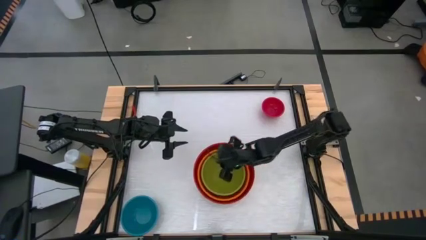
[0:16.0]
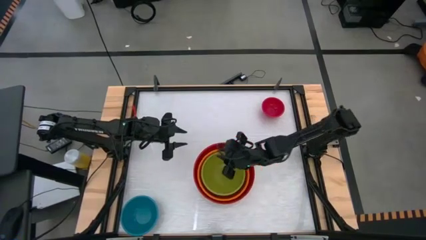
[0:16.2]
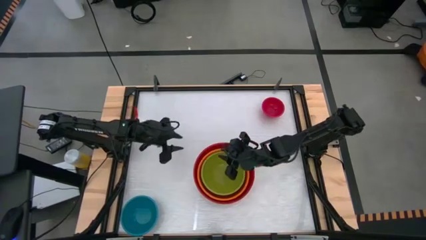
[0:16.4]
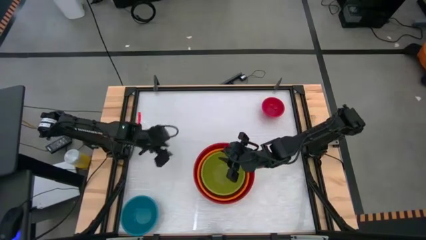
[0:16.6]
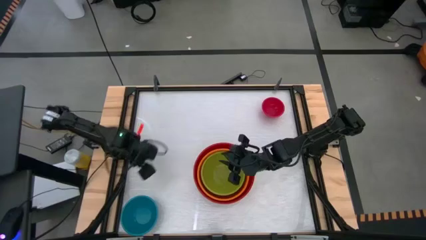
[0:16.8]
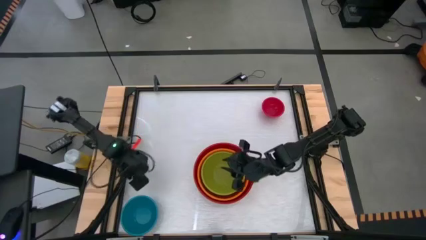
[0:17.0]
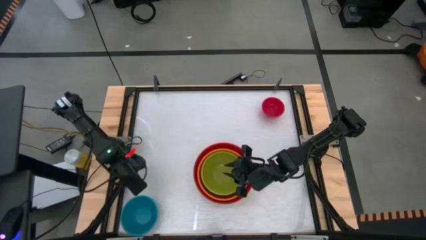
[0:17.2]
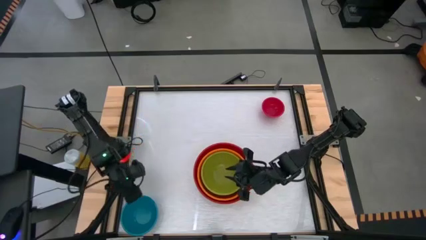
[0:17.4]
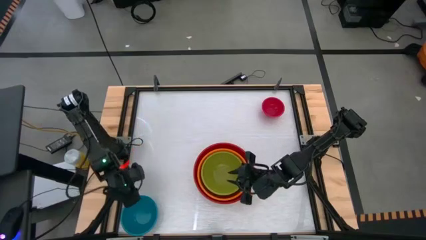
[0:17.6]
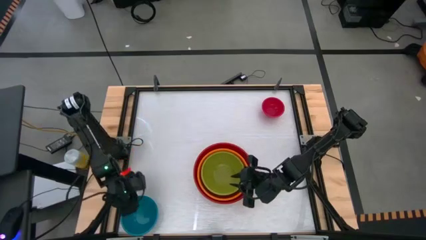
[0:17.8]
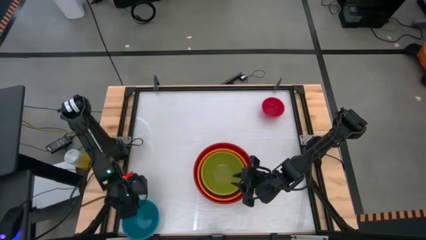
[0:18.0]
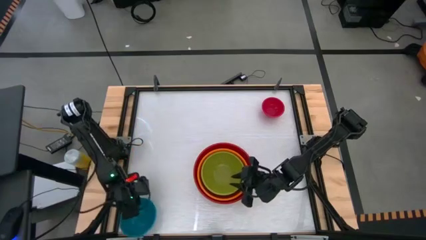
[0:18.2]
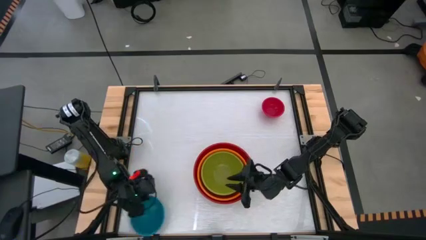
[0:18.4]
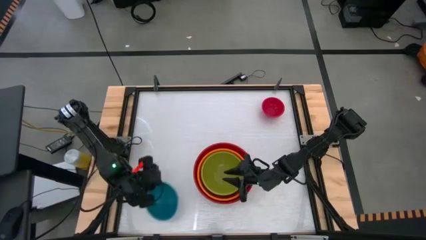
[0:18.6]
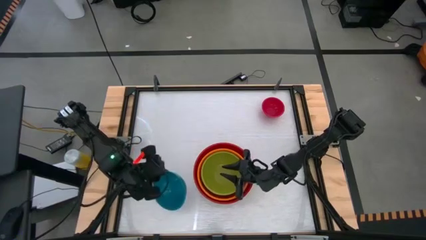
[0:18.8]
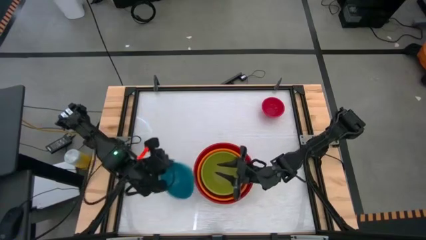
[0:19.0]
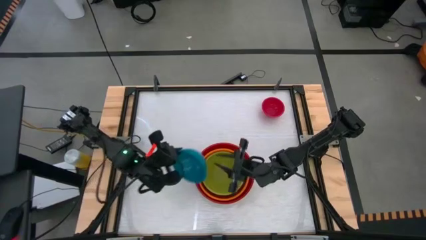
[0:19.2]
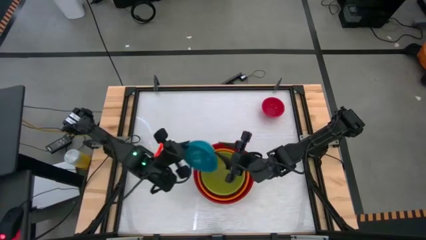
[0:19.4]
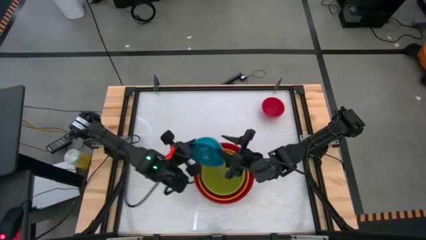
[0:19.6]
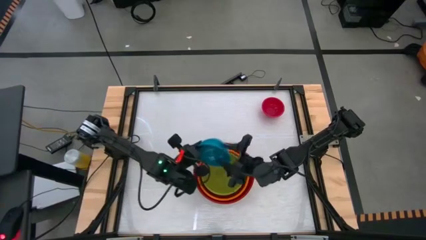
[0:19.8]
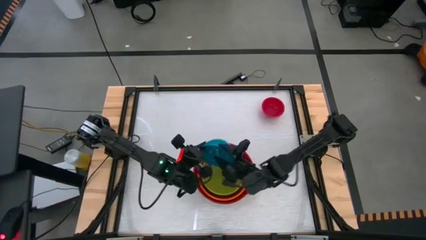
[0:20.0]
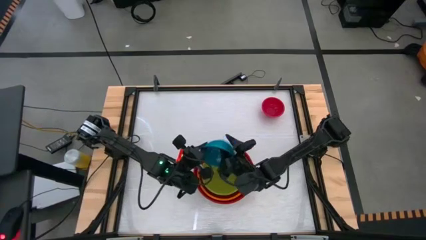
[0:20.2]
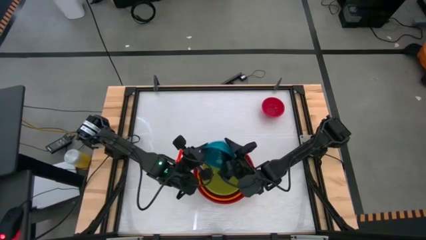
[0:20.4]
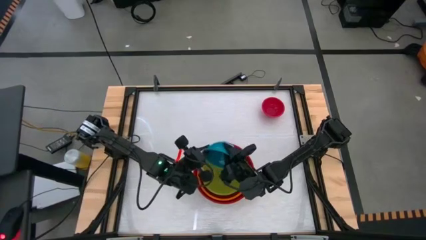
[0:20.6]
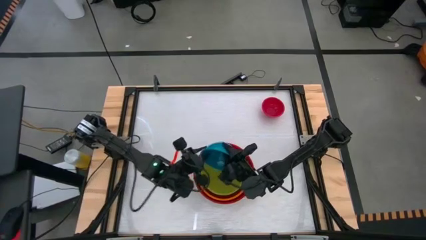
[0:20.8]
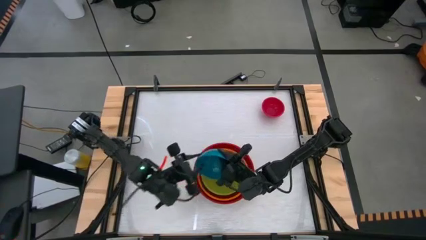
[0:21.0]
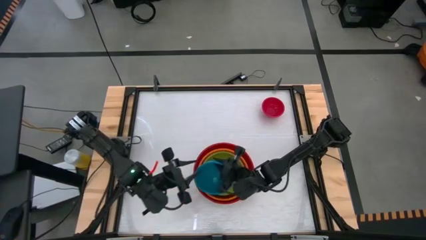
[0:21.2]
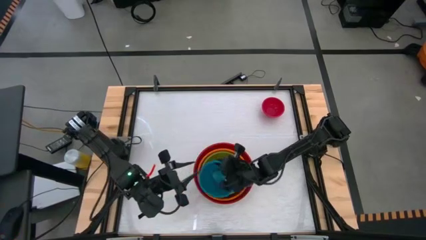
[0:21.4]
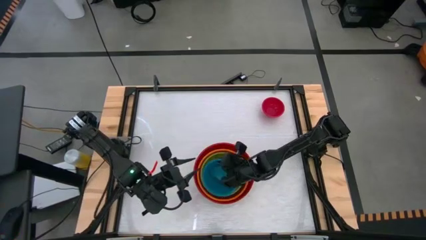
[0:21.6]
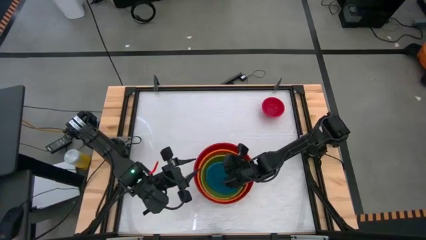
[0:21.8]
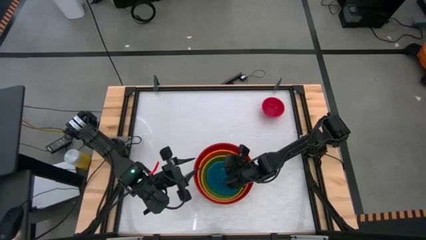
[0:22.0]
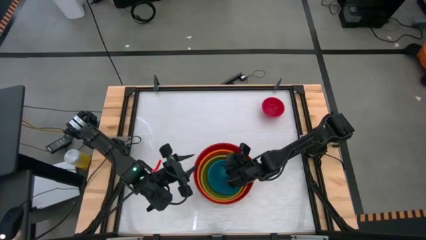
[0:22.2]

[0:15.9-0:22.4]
Stack the blue bowl on top of the green bowl

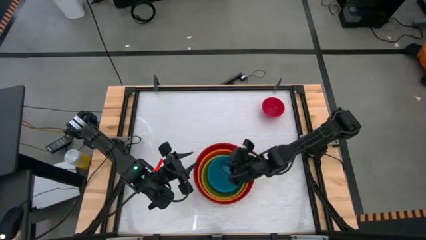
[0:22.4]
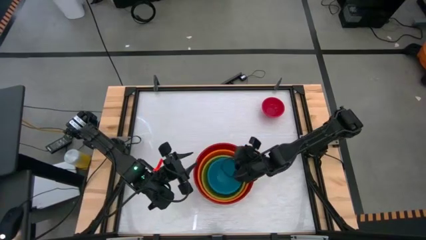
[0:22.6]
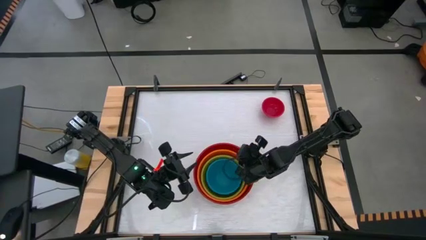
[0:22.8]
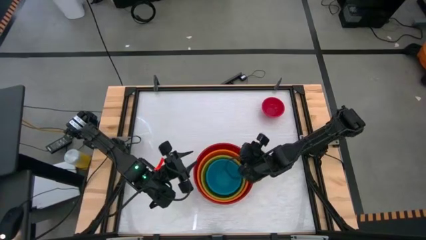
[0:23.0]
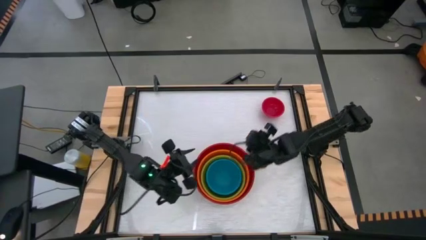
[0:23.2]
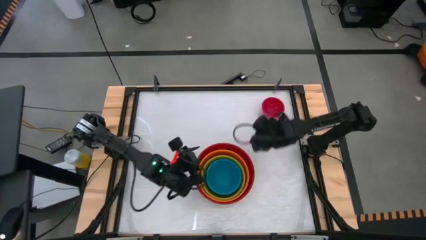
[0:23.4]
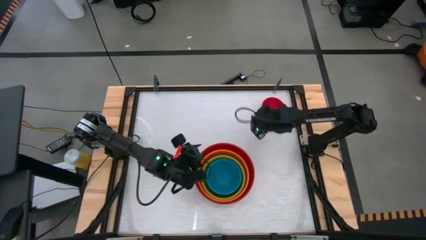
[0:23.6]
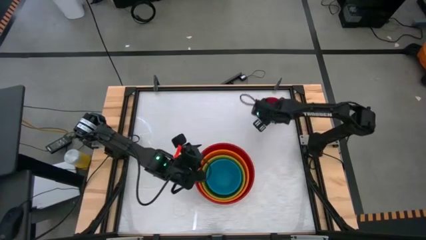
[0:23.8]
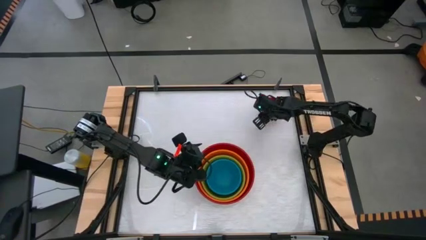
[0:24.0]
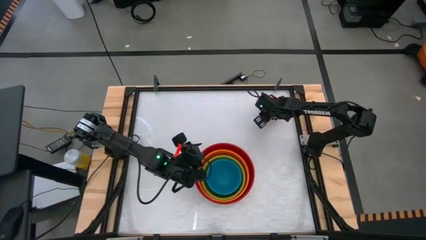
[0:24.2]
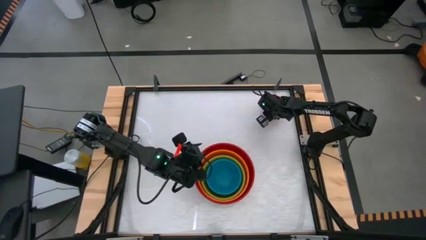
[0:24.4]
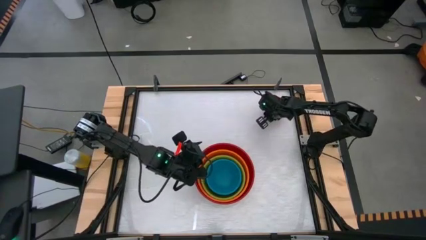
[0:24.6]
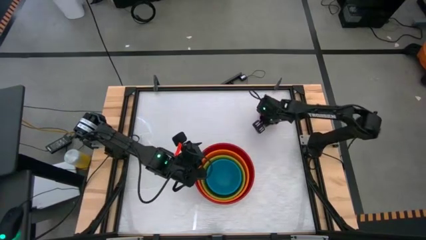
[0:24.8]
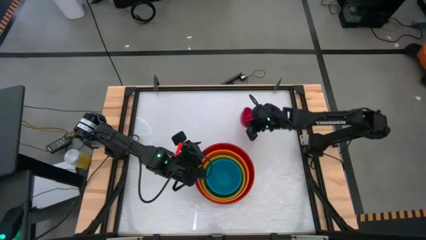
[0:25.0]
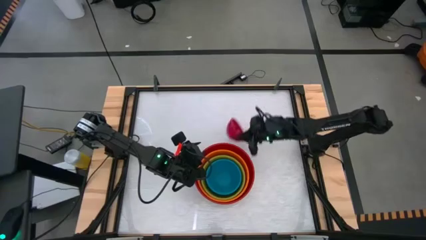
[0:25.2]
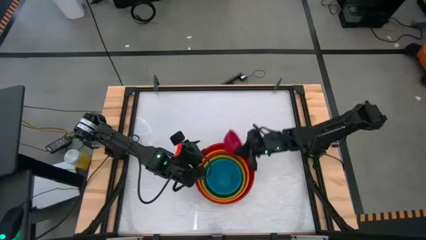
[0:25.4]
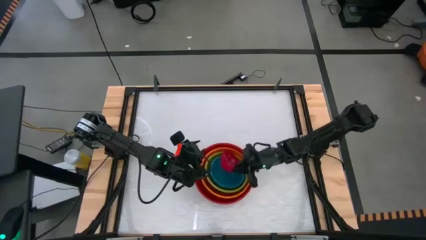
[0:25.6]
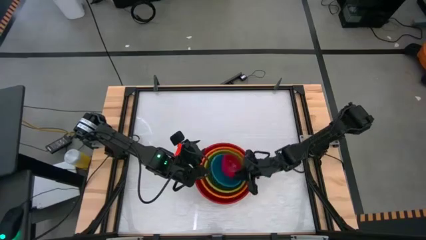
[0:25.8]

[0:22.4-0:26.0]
Stack the pink bowl on top of the blue bowl

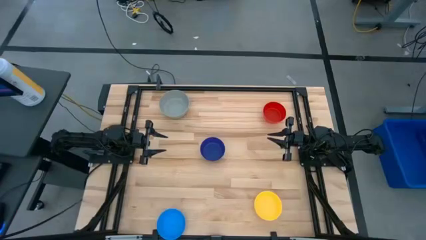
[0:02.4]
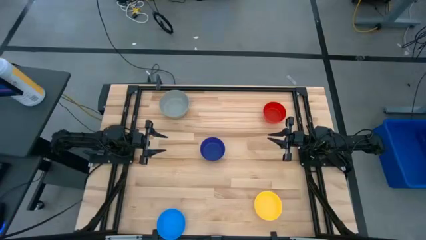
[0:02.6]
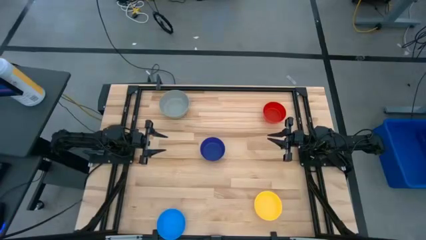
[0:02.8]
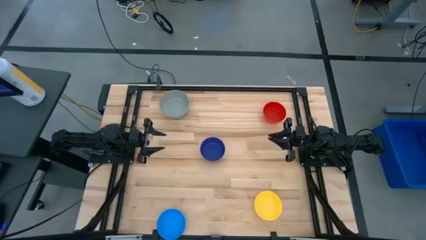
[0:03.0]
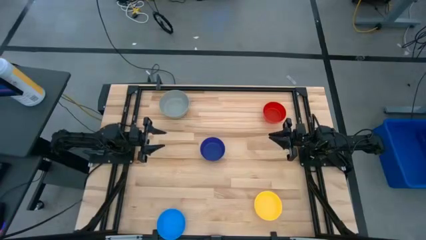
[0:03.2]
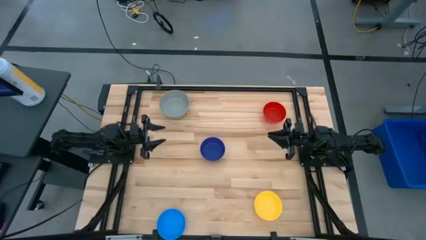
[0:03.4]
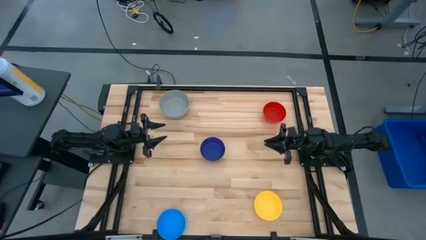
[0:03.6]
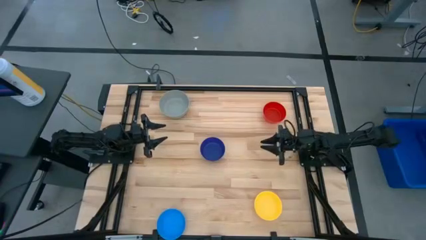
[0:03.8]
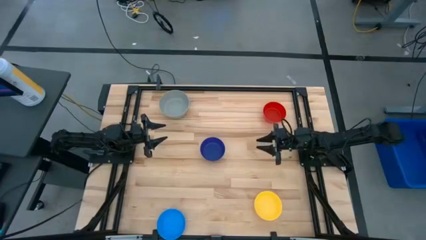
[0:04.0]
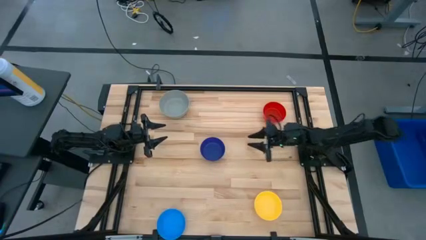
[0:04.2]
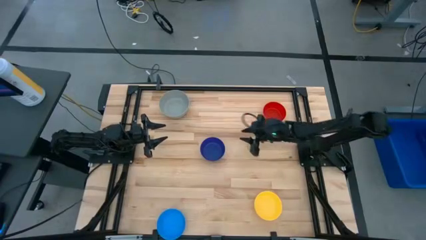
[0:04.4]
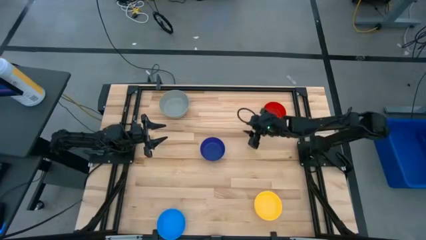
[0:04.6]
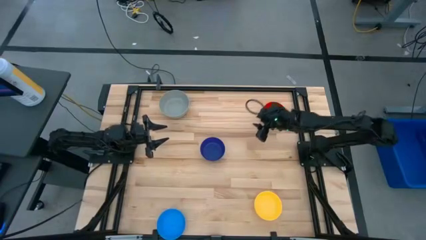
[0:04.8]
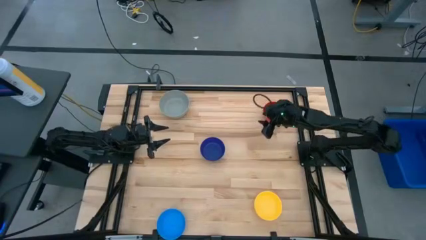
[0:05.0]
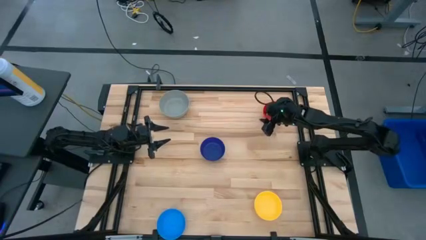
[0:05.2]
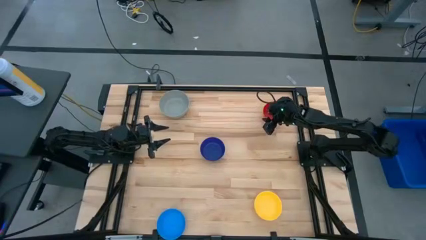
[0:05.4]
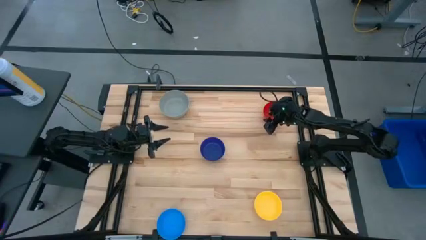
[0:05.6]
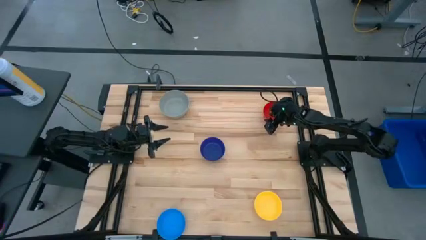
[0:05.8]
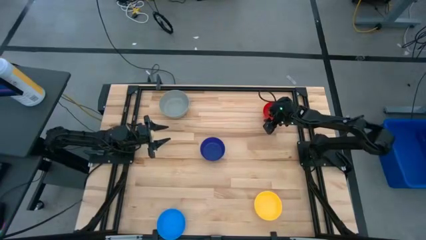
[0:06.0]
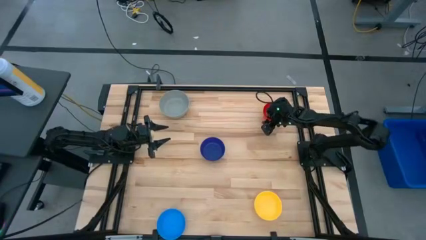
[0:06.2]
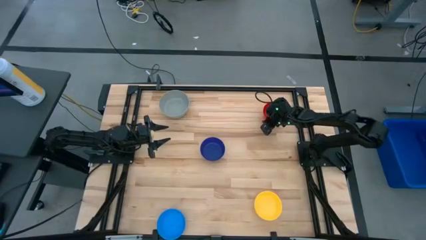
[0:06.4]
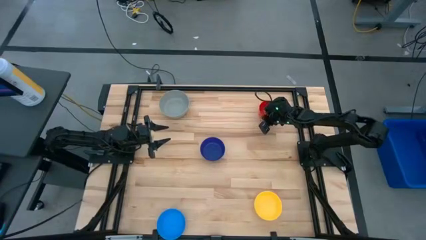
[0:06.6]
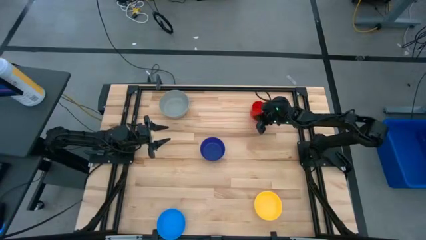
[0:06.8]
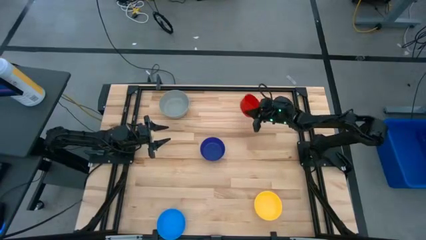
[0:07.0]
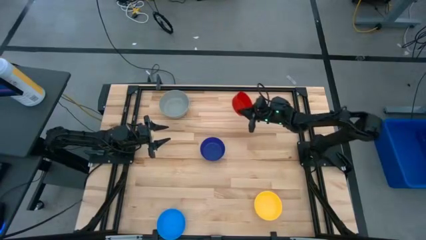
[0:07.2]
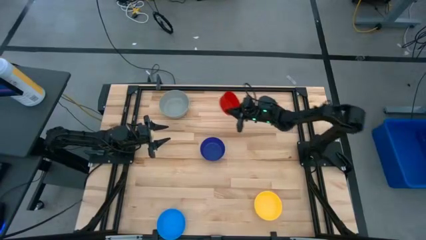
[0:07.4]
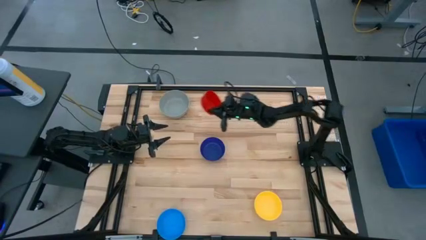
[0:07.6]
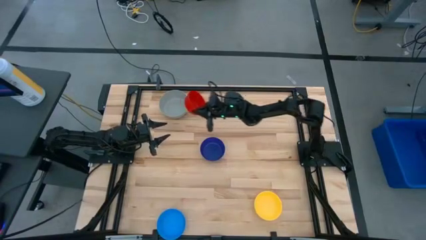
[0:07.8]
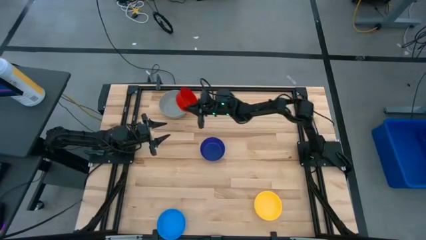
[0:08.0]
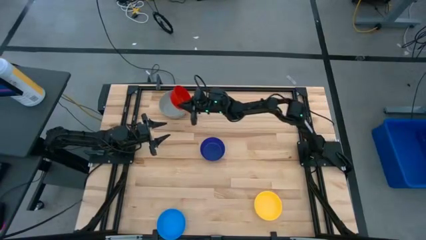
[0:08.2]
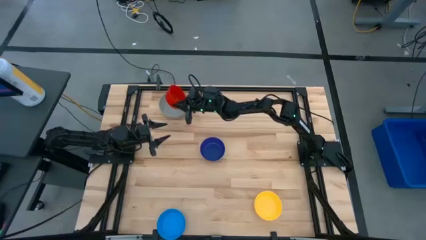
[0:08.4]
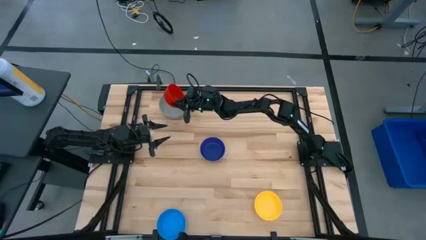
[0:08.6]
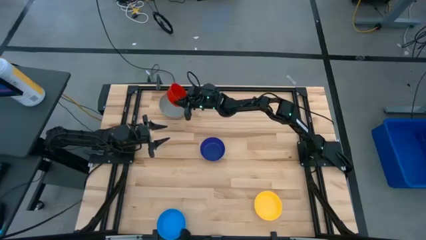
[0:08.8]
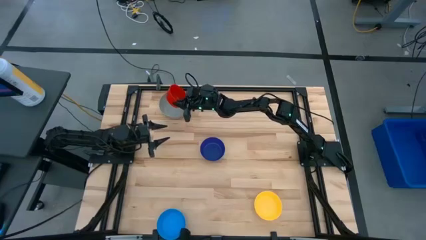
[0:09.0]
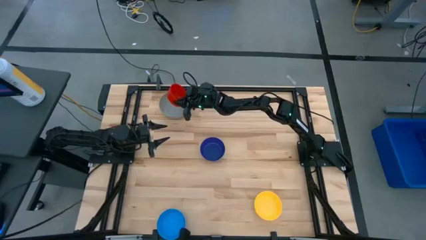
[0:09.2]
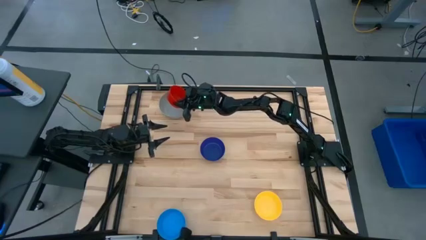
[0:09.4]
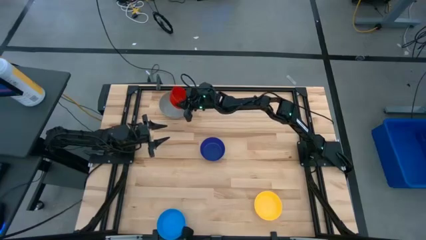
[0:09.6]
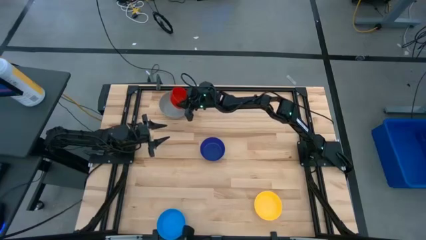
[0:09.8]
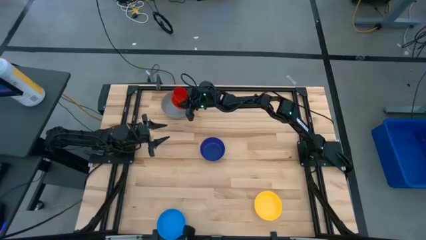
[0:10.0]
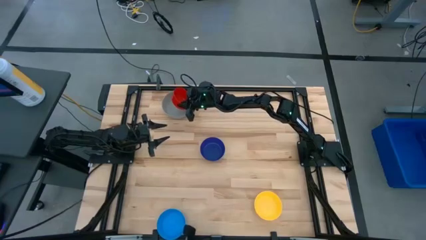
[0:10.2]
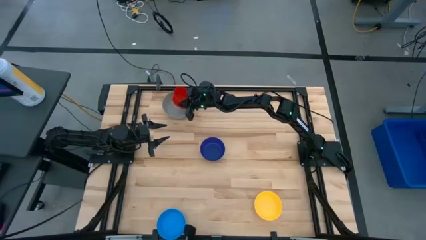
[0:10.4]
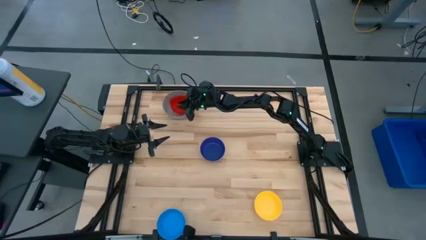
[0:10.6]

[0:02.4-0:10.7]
Stack the red bowl into the gray bowl
